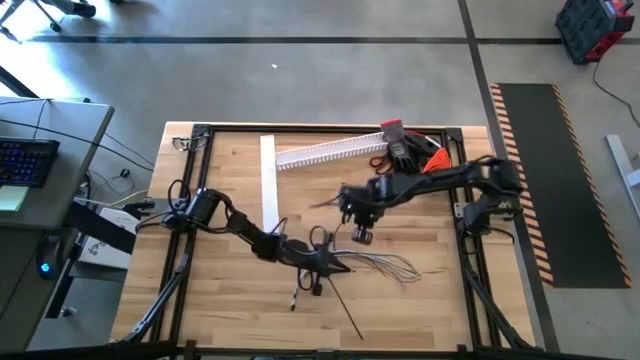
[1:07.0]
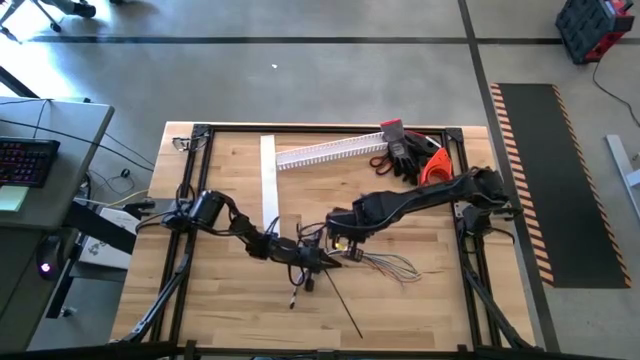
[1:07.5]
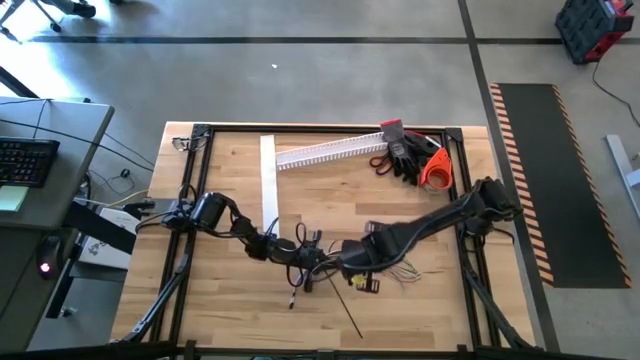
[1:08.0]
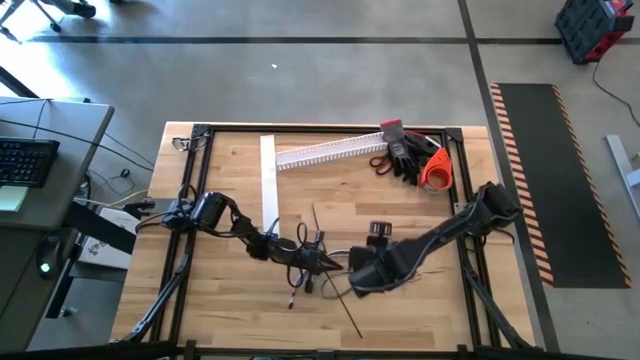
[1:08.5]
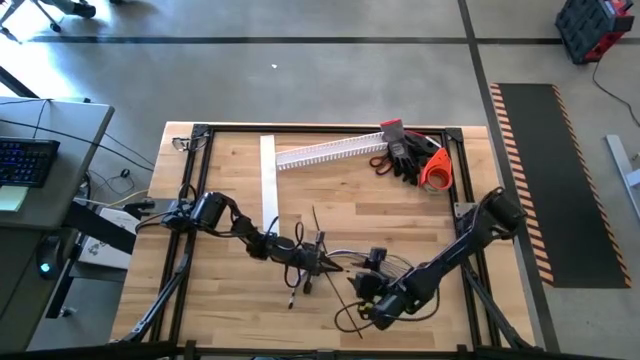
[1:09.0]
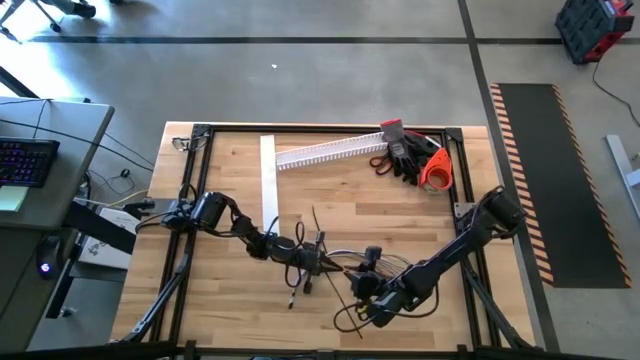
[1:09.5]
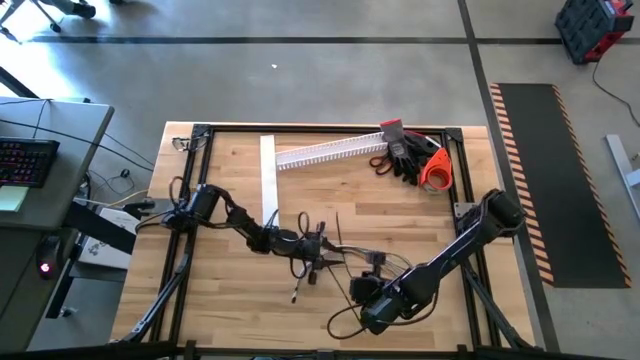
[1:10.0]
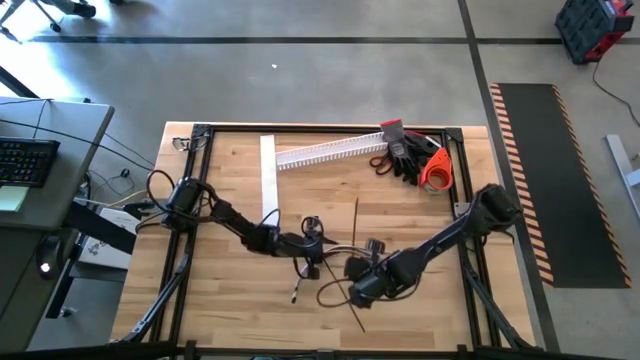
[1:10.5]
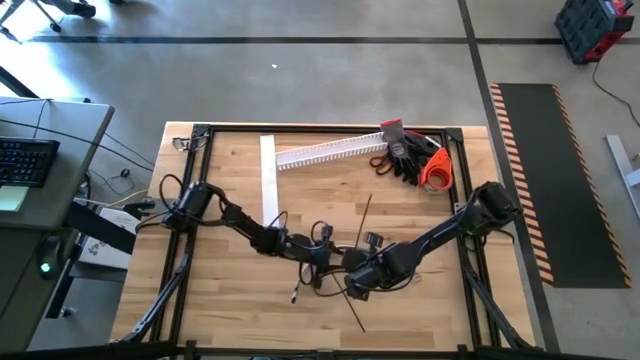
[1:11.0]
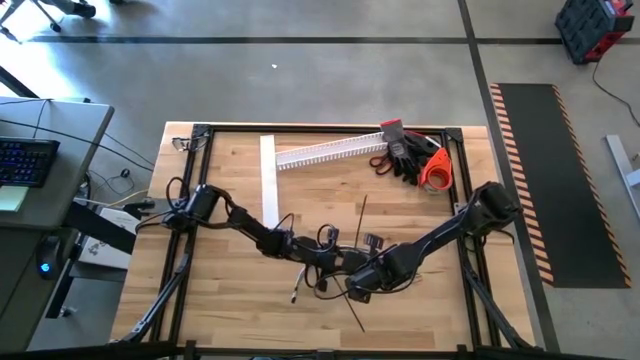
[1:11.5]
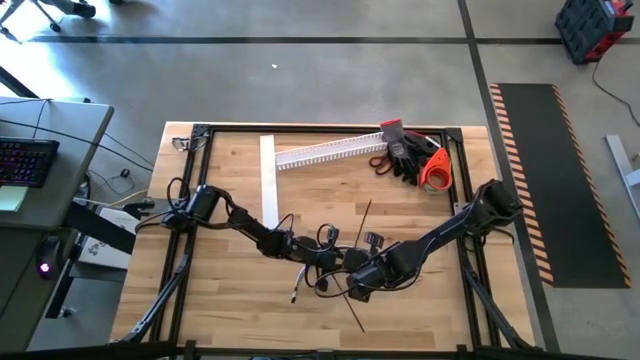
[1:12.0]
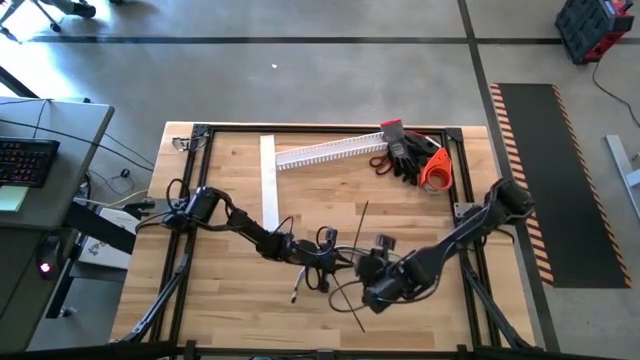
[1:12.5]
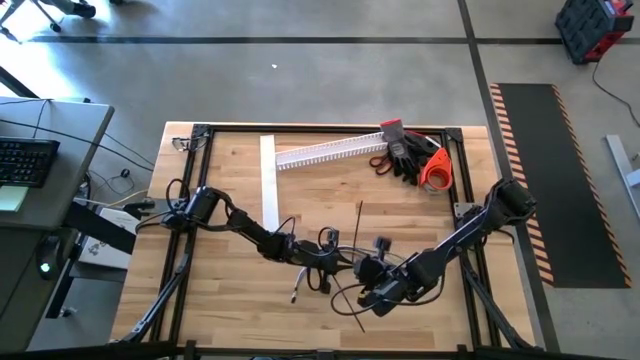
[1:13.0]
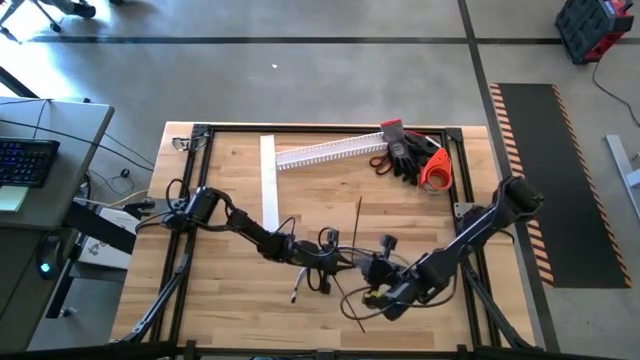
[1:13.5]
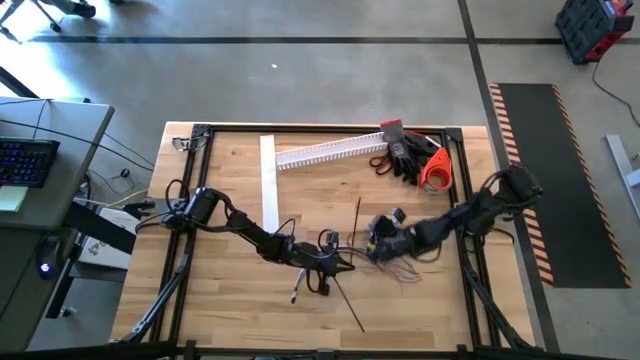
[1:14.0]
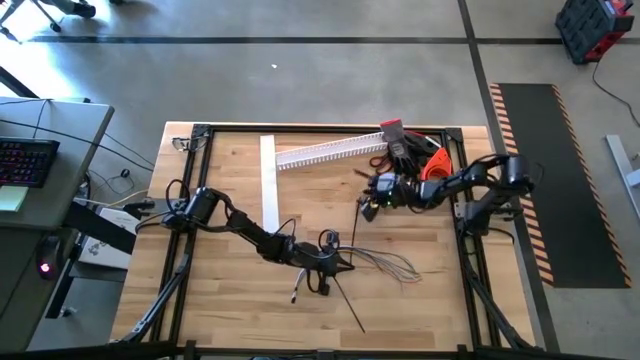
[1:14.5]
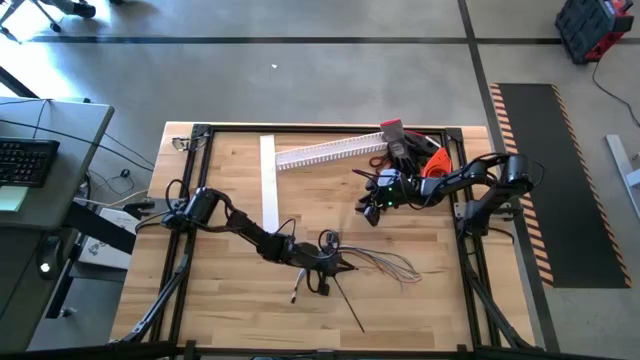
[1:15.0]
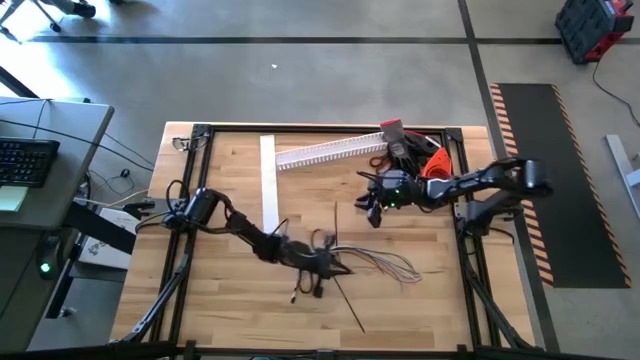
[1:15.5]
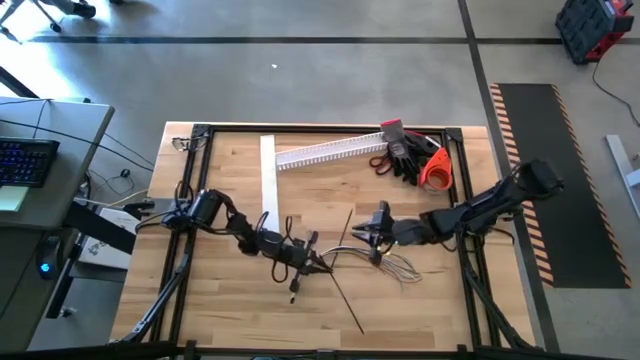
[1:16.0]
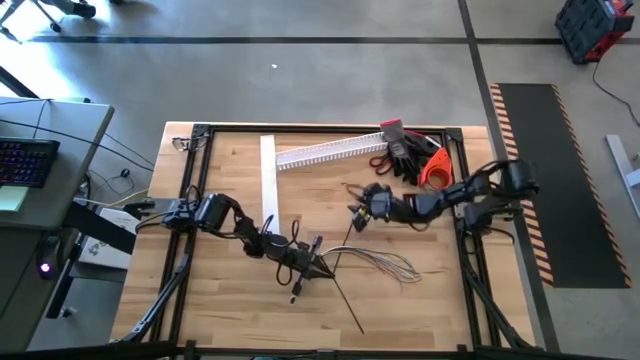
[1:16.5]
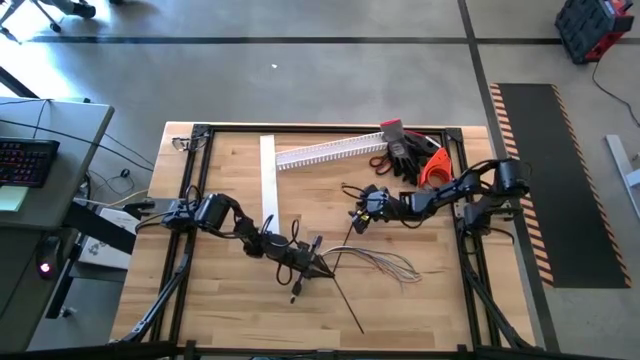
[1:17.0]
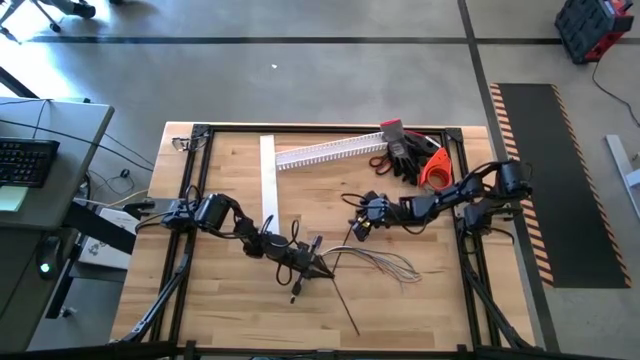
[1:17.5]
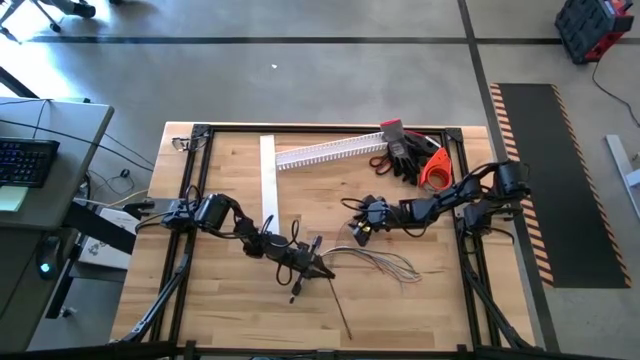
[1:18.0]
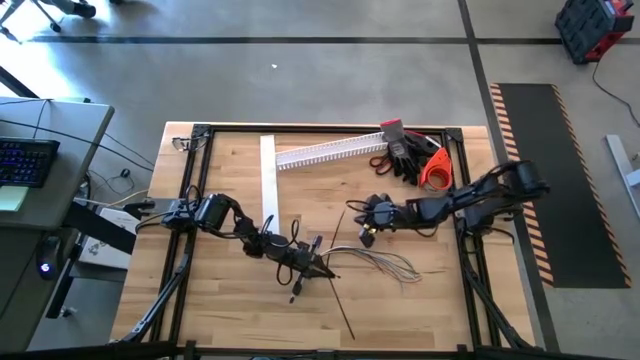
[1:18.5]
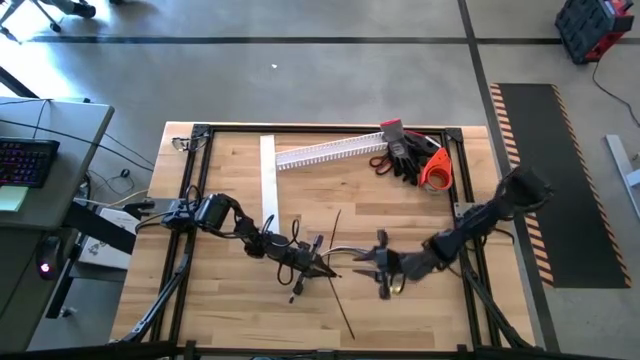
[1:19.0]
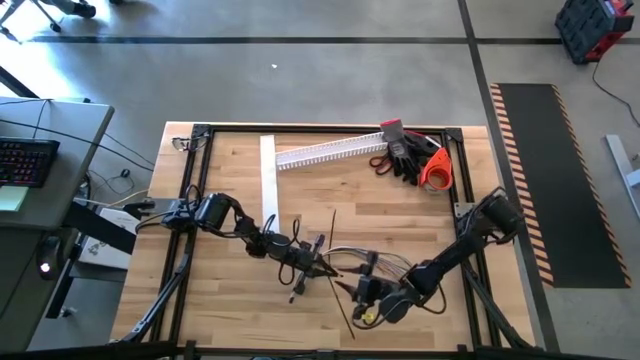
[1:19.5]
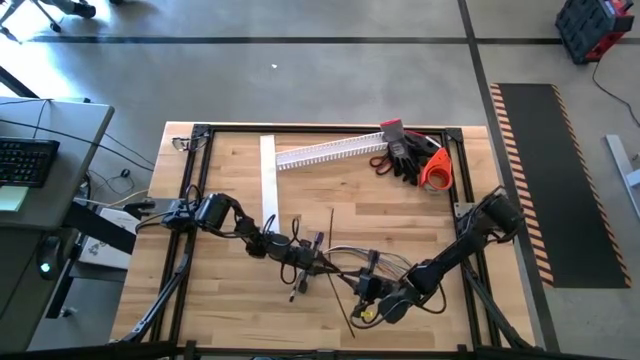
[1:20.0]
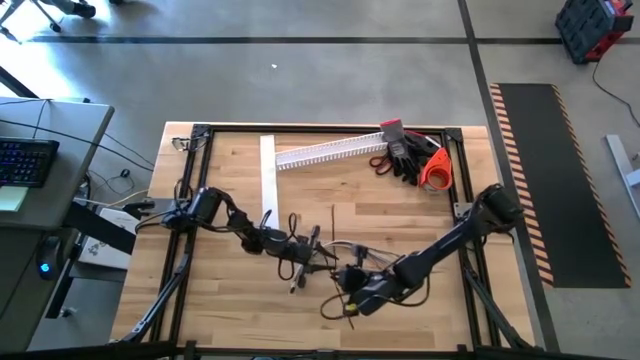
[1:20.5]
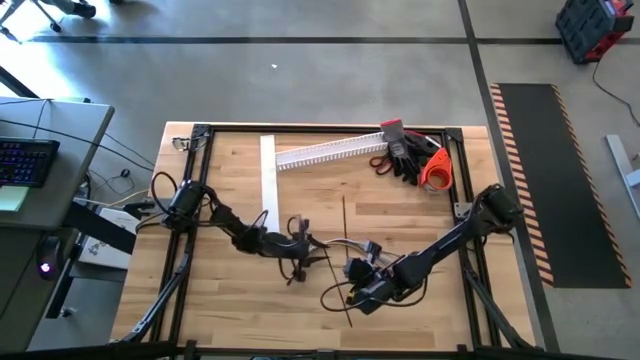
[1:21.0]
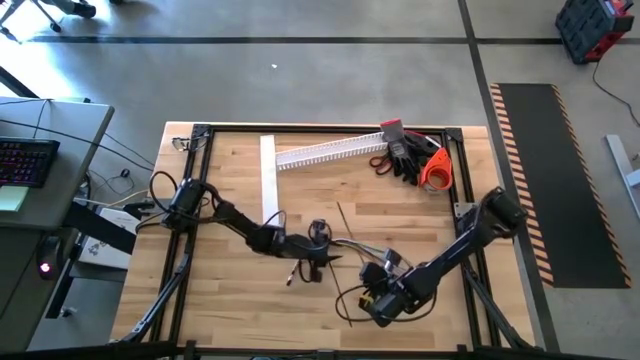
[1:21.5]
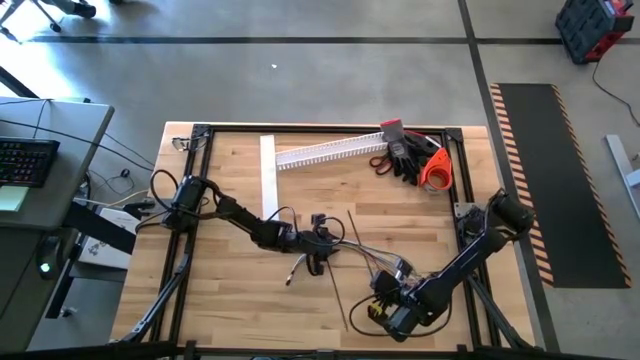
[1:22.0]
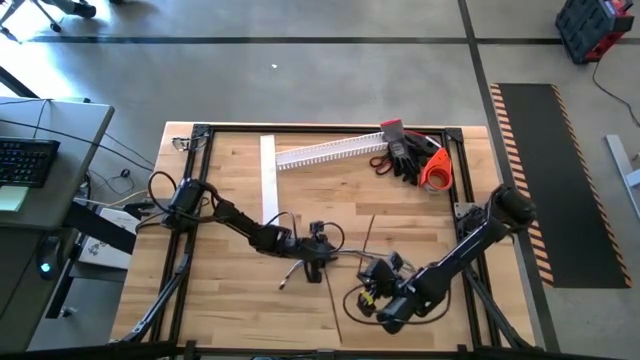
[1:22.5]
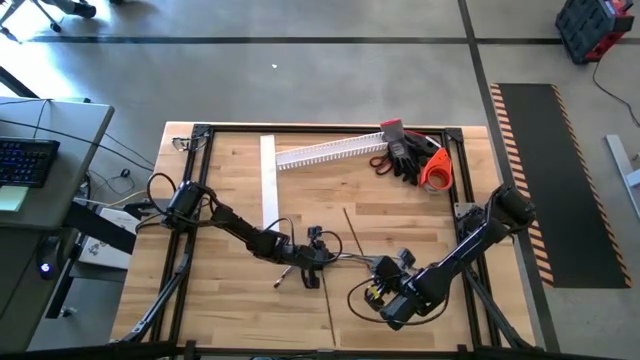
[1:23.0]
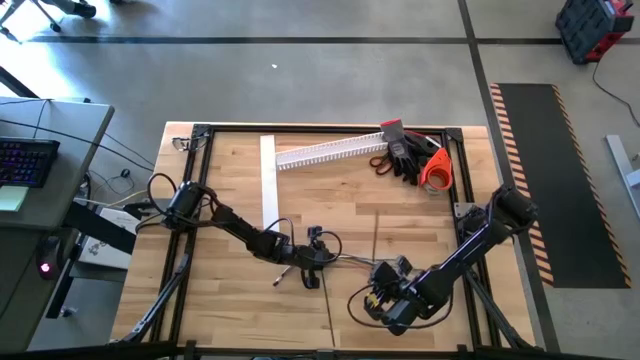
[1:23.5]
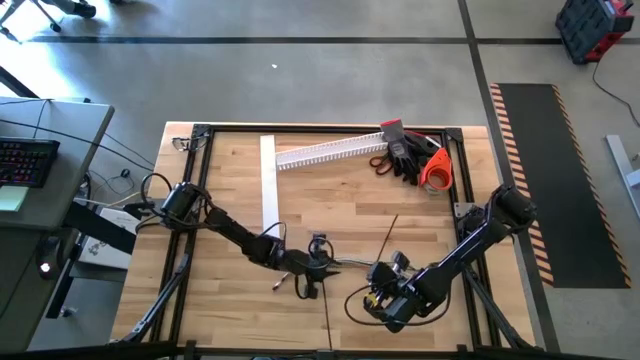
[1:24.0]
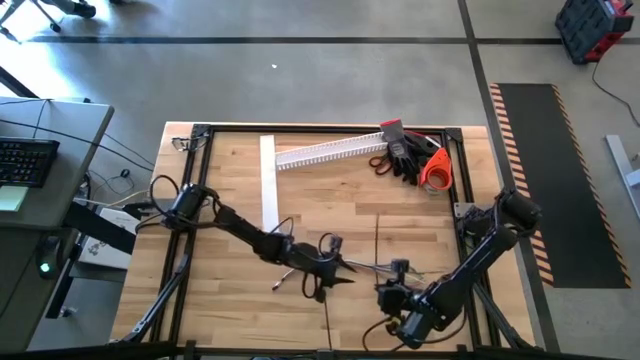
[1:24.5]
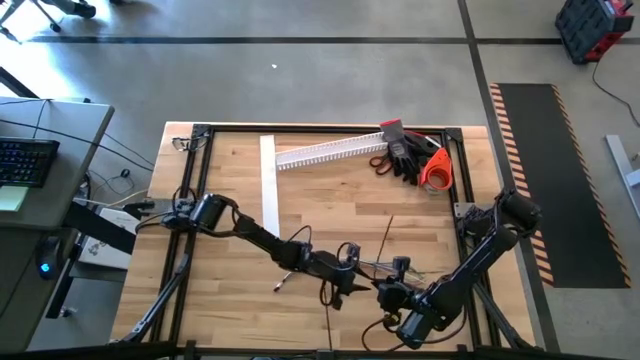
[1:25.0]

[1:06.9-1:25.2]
Task: Ziptie cables
Wrap the cable wires with the black zip tie

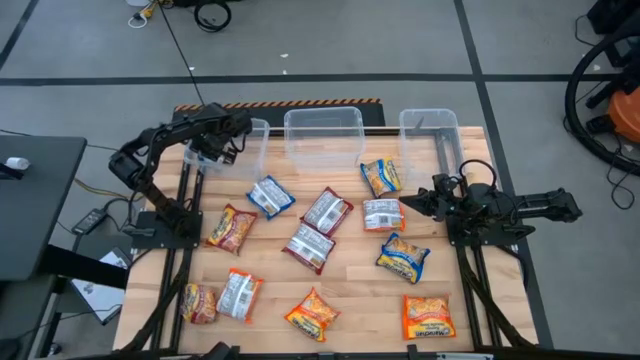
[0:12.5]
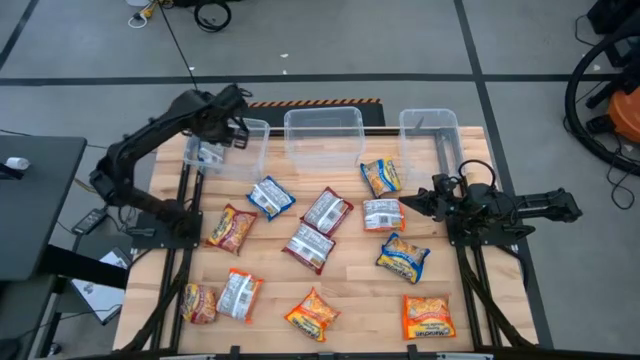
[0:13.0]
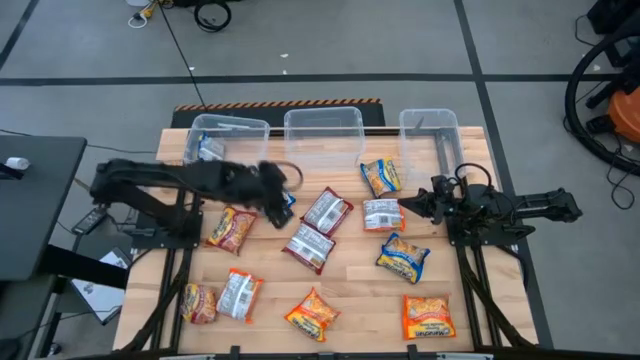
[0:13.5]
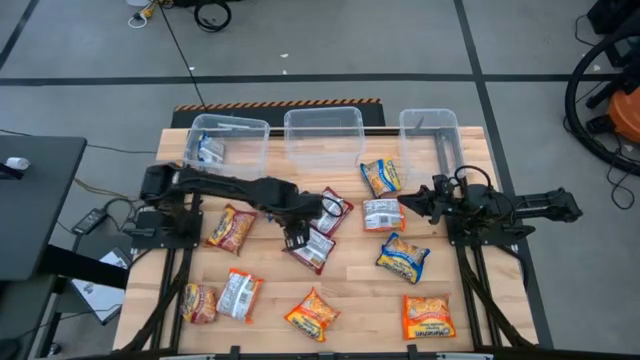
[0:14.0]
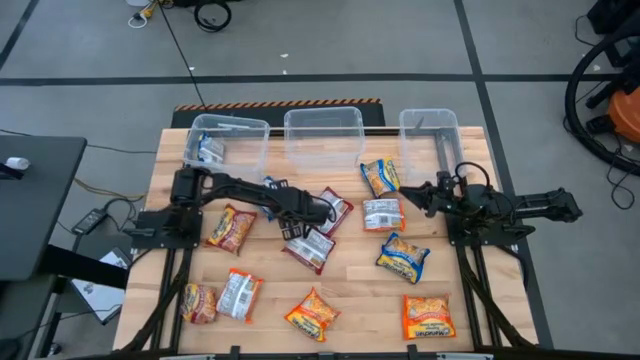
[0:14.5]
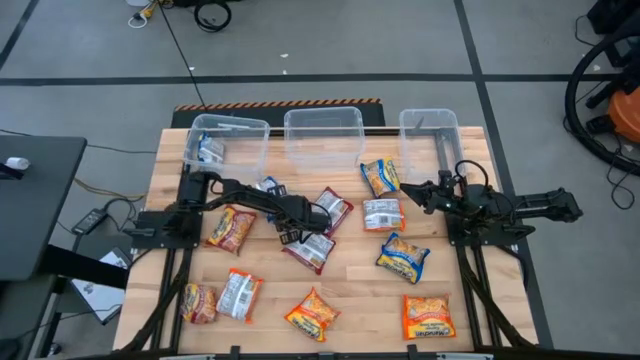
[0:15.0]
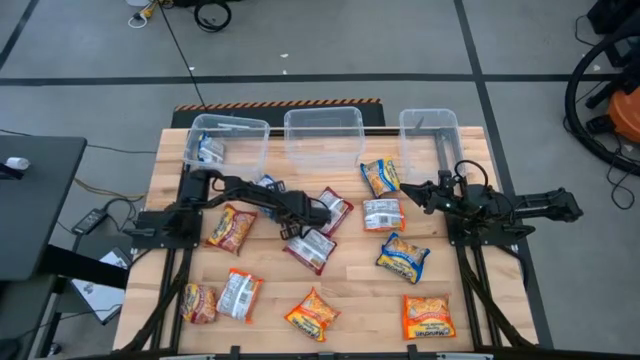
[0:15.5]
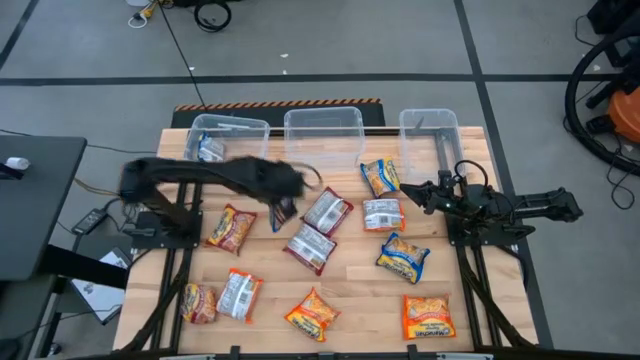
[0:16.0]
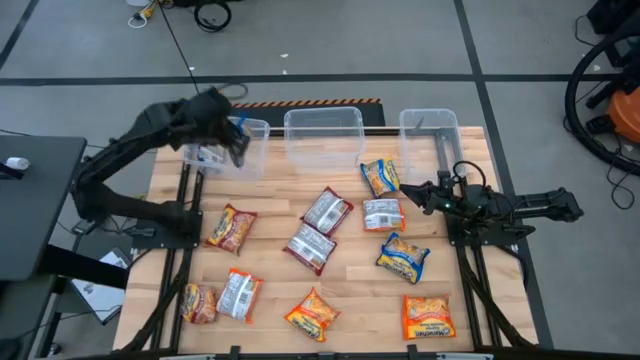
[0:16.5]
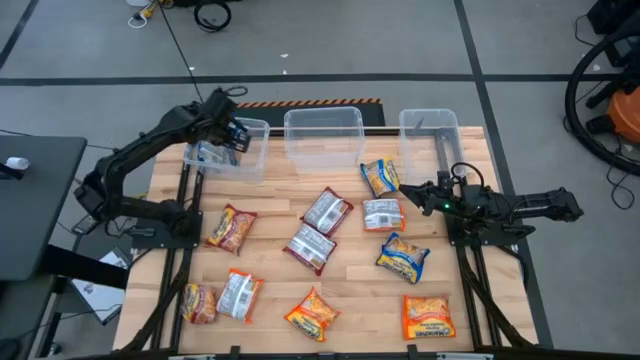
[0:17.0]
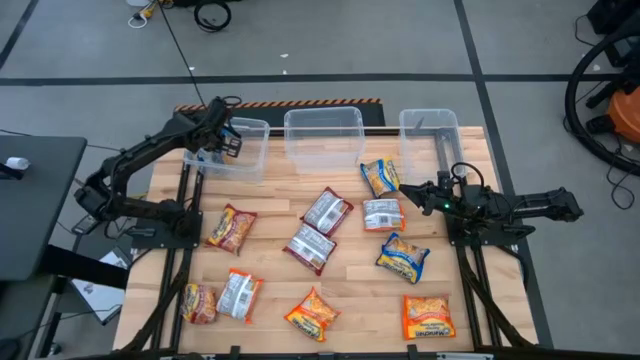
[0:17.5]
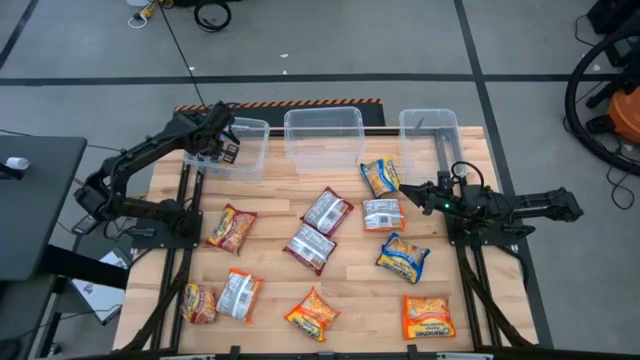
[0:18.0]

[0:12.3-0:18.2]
Task: Sort Maruchan noodles
Put the left blue noodle pack into the left transparent bin
